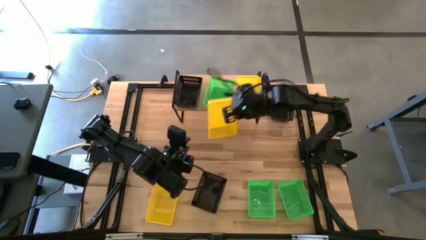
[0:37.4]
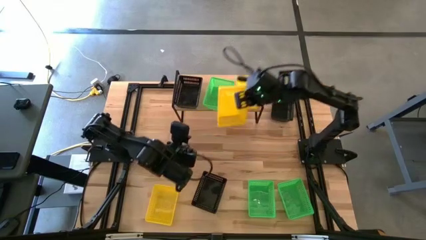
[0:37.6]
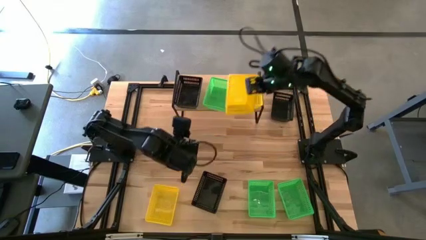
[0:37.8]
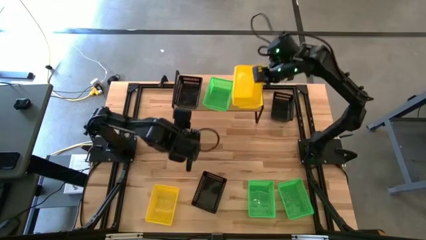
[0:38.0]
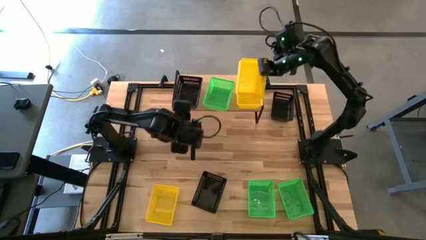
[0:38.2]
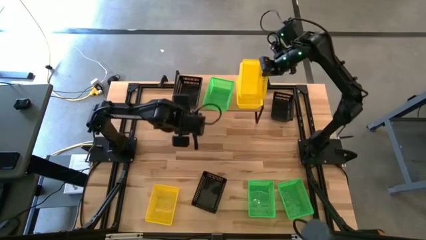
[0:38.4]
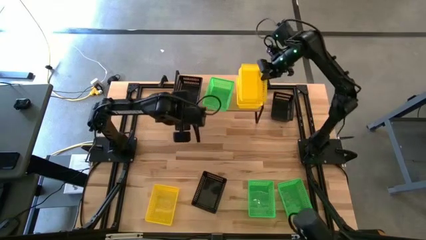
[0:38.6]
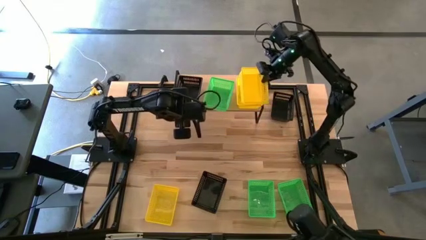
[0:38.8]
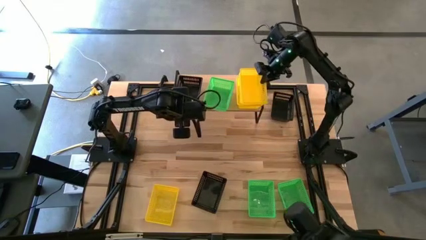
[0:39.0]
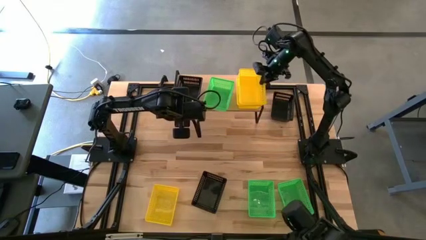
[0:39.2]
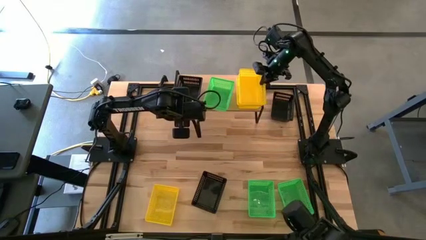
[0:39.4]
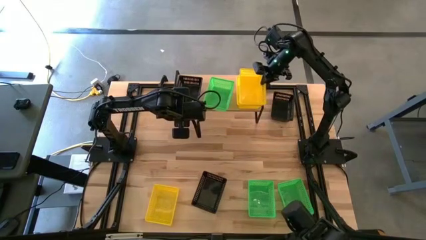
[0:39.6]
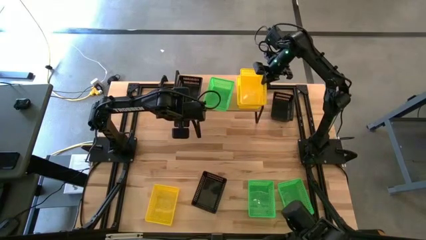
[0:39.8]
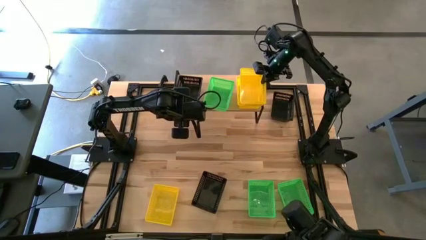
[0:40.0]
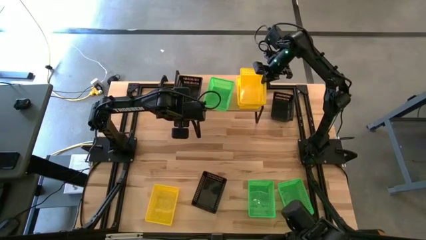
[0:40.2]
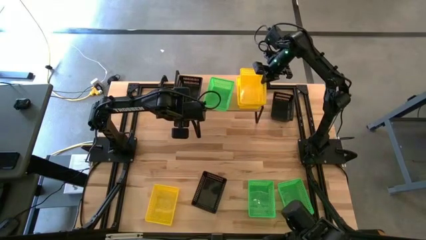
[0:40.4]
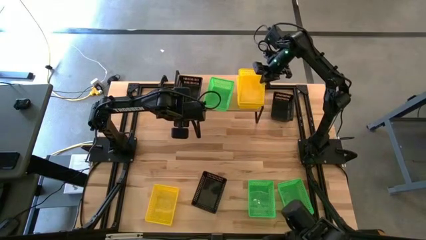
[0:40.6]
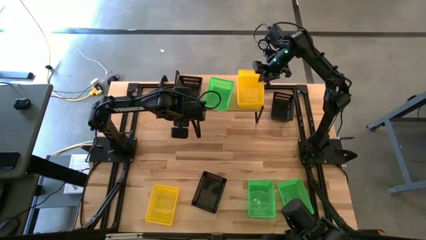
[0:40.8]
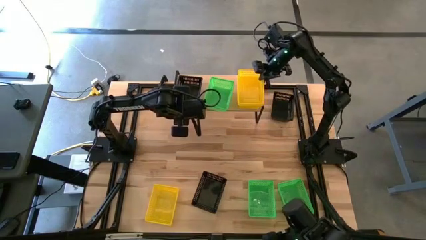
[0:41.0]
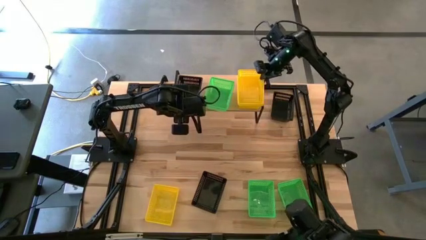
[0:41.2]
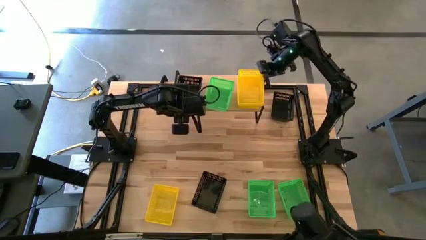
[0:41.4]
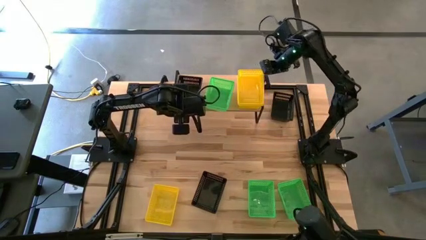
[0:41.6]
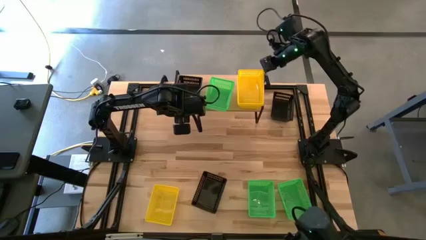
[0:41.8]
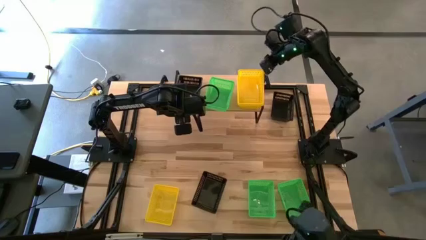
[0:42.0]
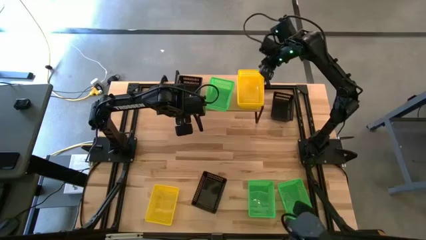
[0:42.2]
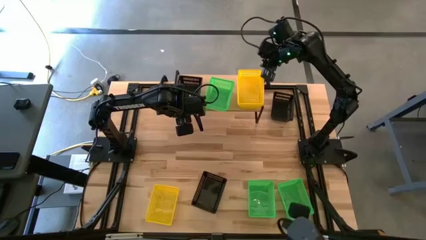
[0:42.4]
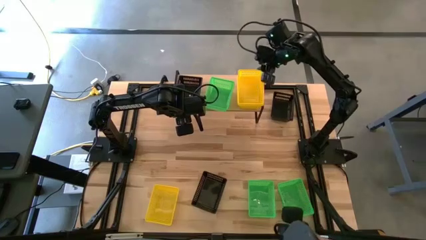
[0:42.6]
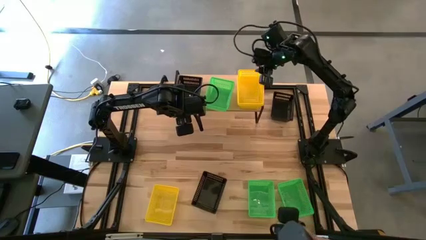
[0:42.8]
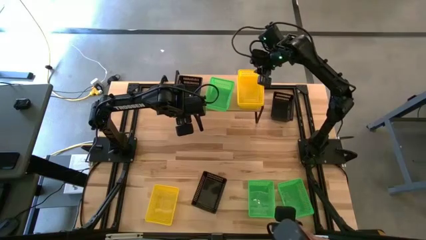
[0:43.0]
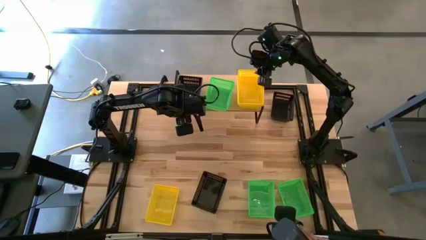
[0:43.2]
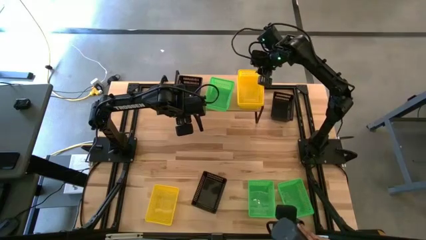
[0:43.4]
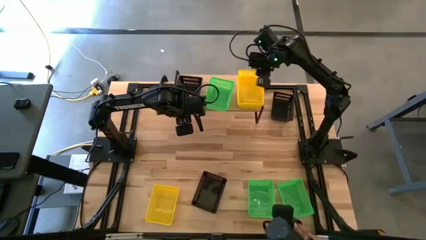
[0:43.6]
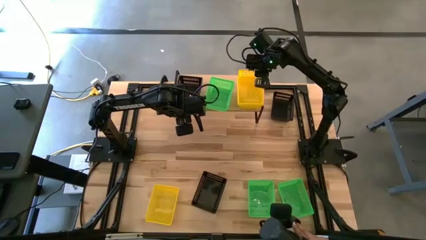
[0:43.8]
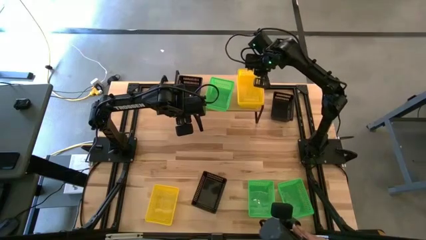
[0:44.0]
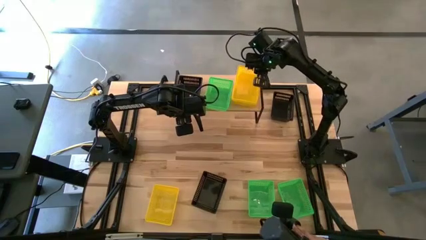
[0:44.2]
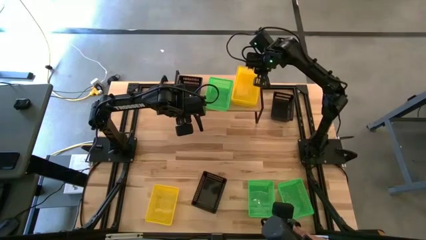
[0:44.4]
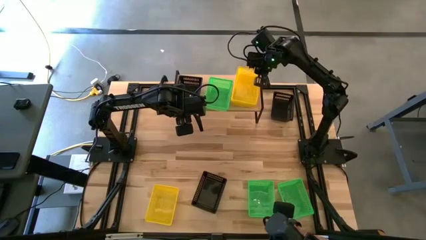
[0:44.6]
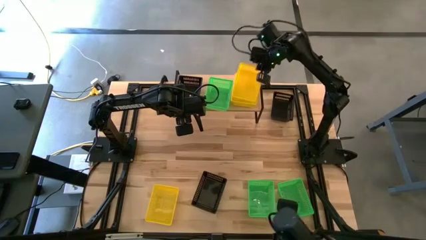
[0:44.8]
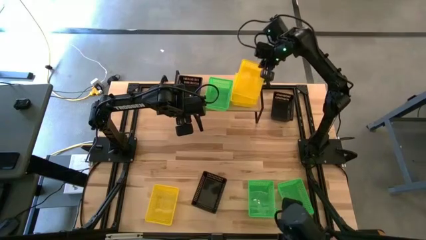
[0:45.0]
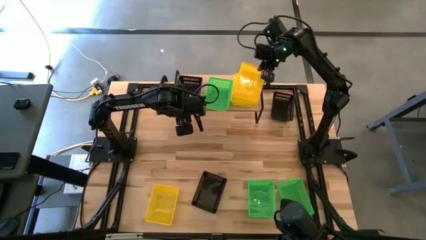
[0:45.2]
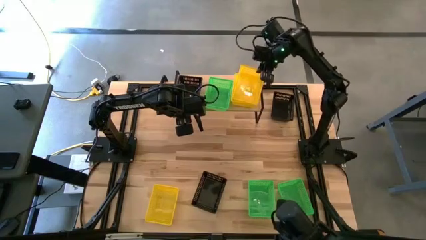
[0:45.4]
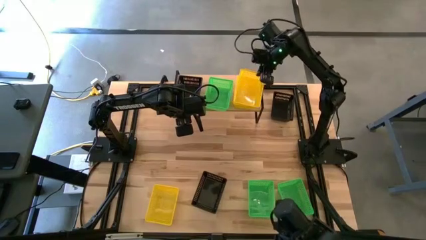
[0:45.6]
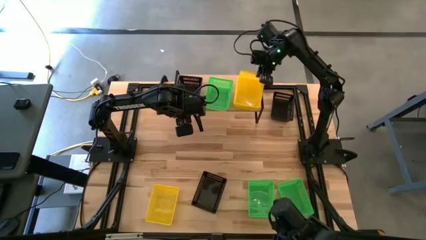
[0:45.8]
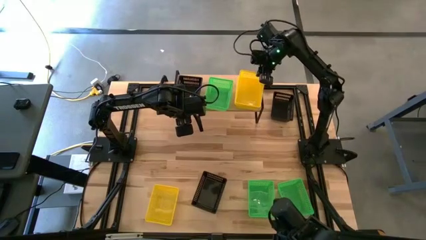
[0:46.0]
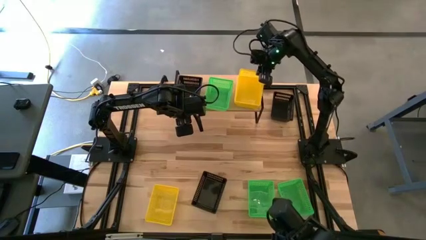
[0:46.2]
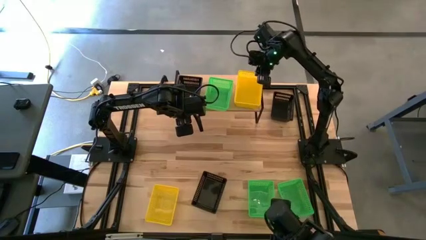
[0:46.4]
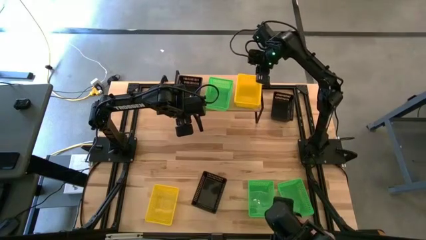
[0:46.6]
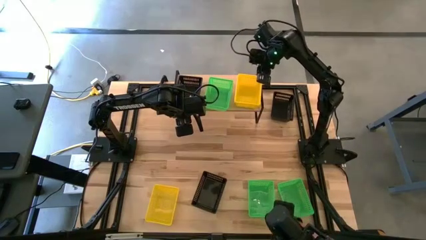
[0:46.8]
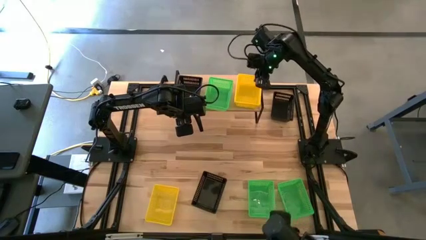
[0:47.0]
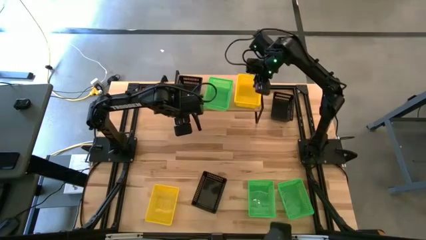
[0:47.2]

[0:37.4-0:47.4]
Task: Stack baskets on shelf by color
Stack the top yellow bin on top of the other yellow bin on the shelf

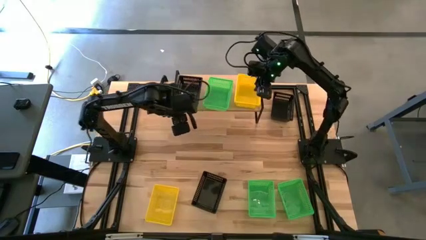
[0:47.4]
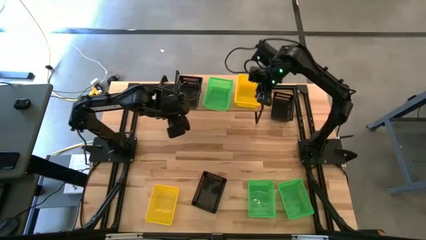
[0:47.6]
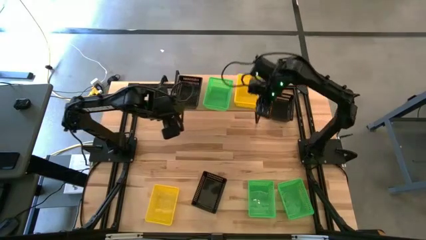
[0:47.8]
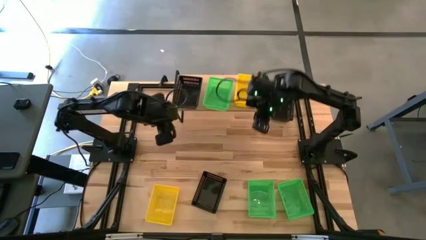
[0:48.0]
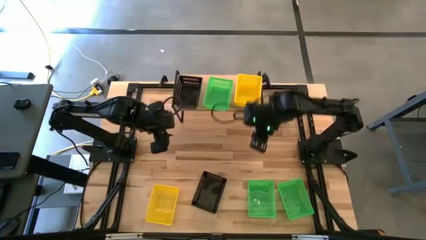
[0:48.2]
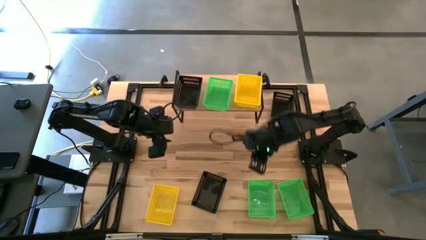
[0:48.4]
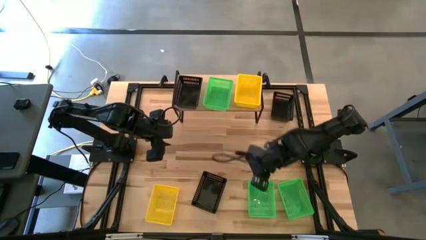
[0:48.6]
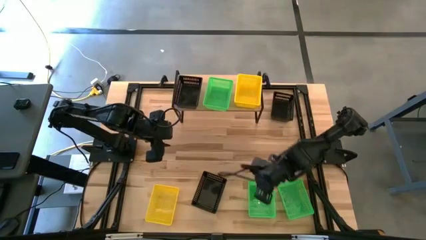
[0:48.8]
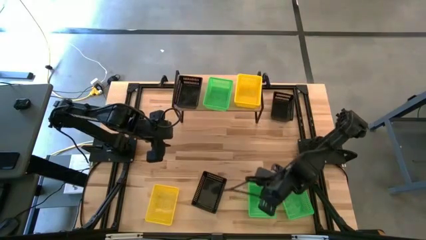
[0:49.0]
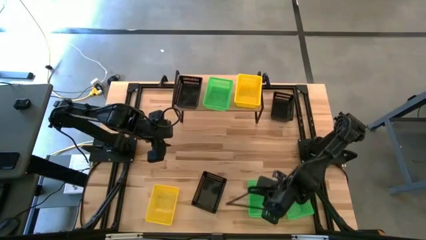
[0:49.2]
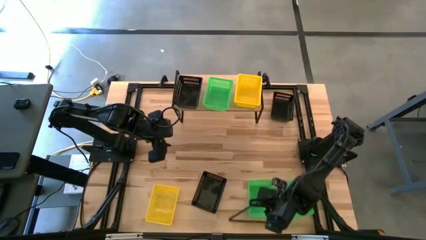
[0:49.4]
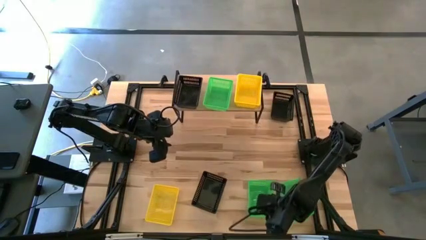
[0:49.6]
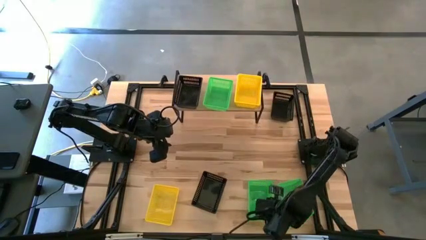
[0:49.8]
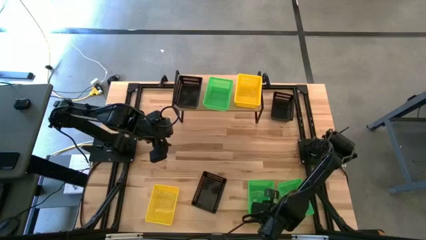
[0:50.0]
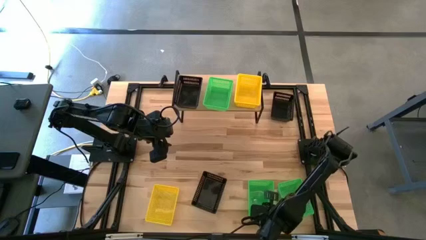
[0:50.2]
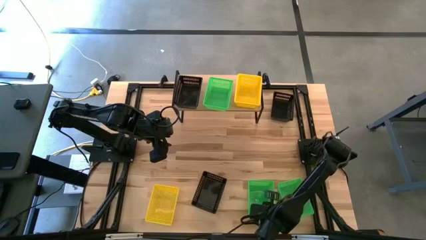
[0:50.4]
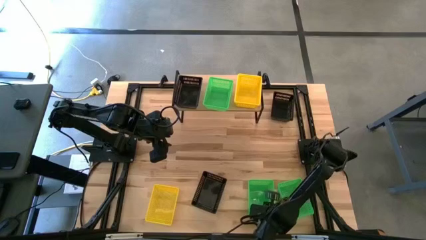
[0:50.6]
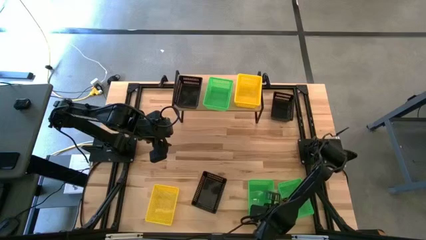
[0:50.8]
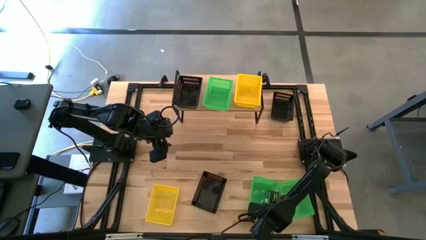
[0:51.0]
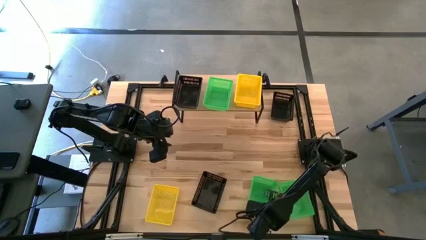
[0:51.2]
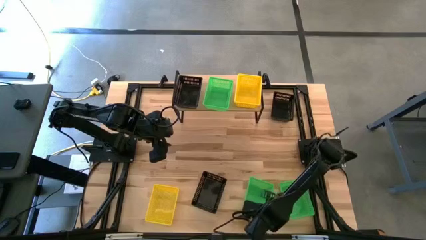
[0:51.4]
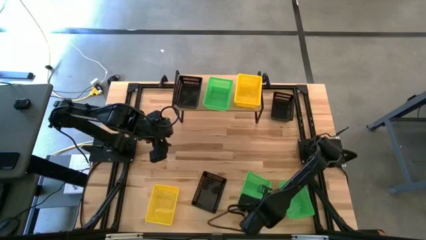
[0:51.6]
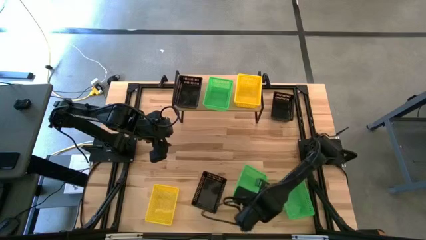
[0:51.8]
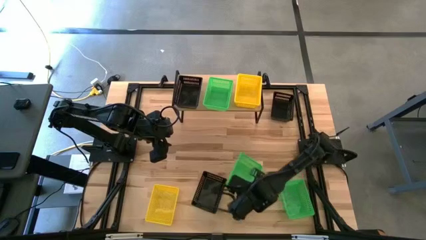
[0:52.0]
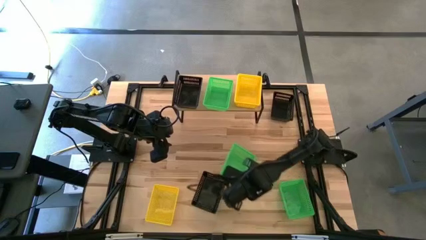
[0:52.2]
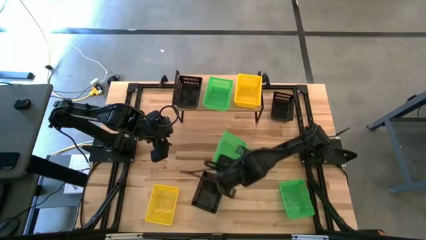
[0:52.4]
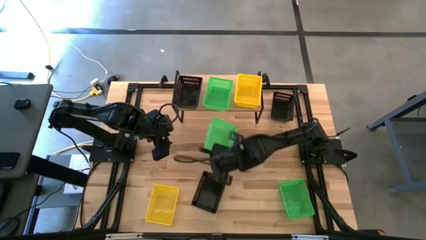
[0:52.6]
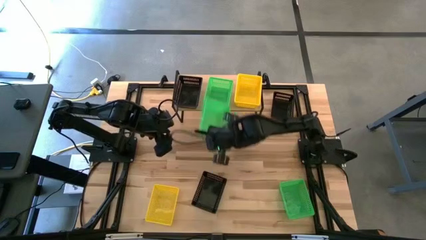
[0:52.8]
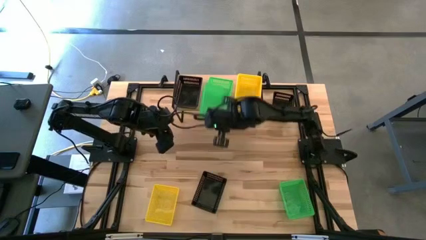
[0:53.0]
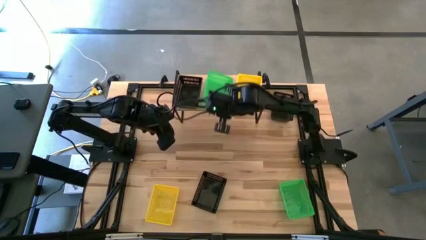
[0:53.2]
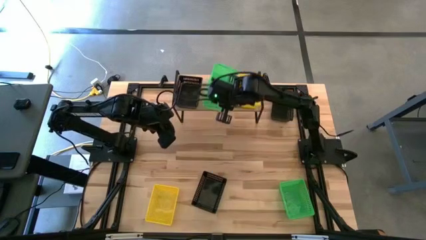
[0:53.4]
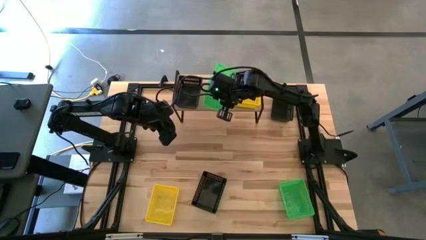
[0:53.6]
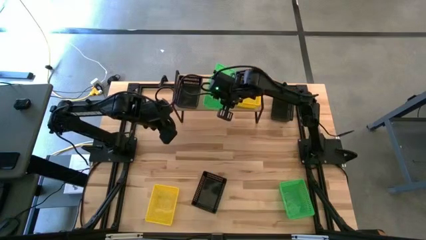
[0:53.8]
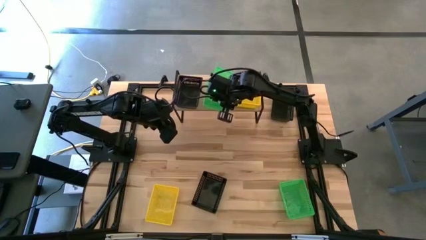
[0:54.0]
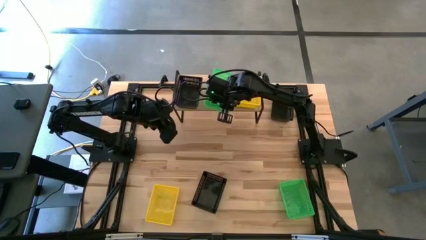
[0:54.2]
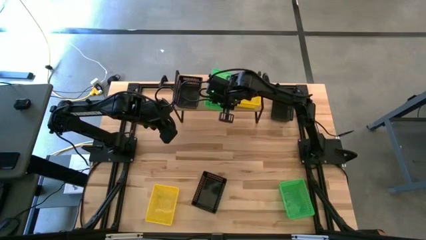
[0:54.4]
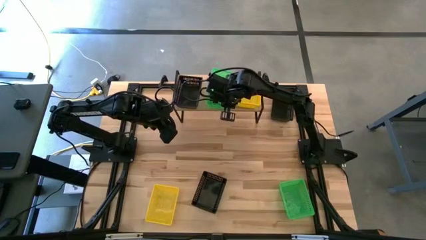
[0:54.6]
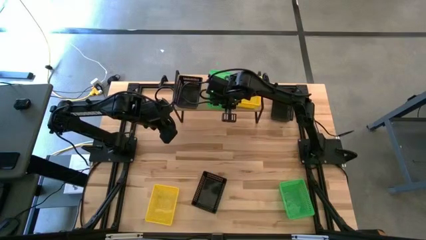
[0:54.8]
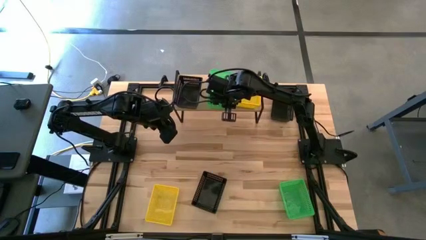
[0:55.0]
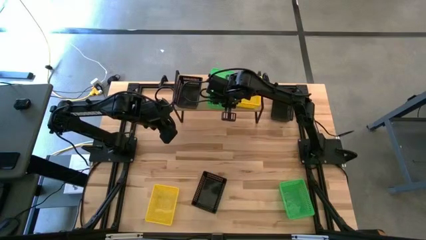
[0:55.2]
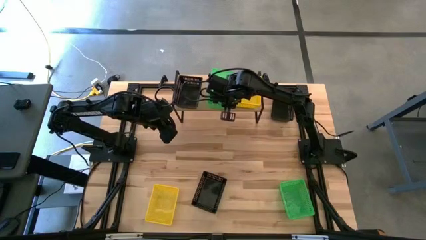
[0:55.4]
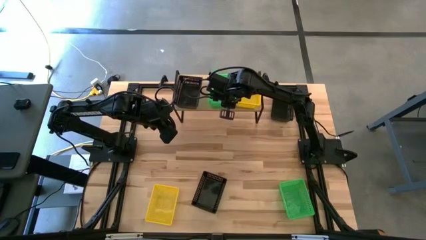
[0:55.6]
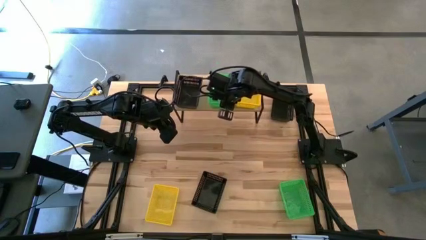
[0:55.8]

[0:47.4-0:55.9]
Stack the left green bin on top of the other green bin on the shelf
